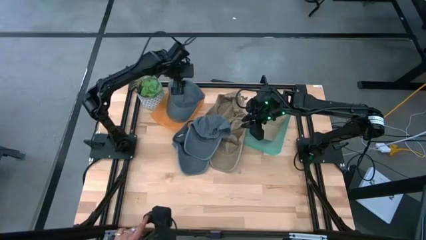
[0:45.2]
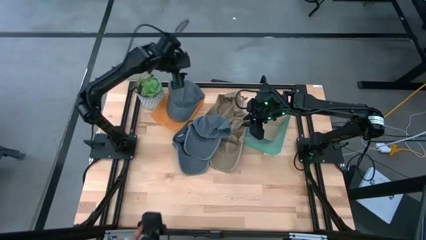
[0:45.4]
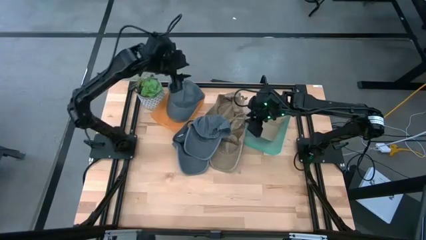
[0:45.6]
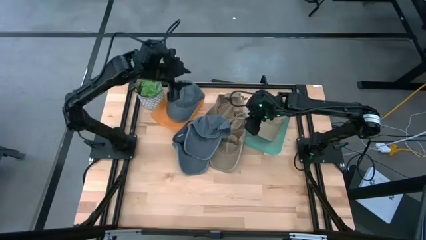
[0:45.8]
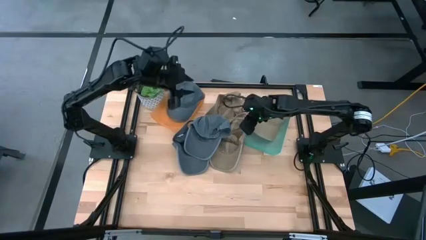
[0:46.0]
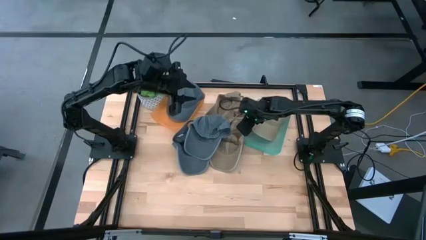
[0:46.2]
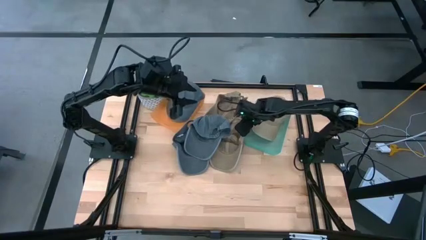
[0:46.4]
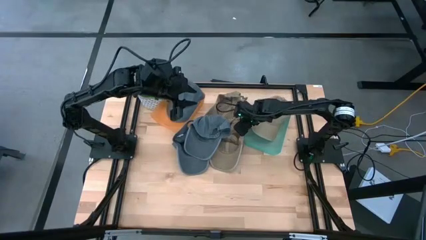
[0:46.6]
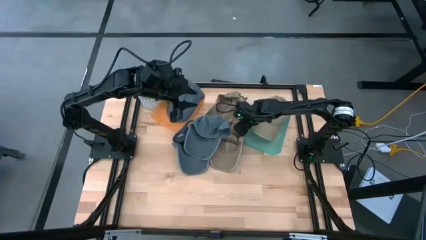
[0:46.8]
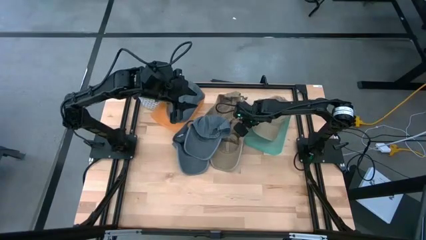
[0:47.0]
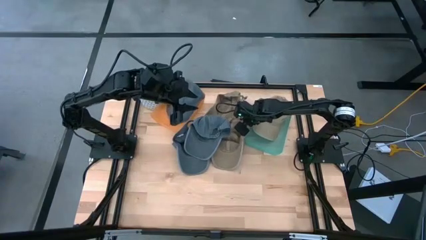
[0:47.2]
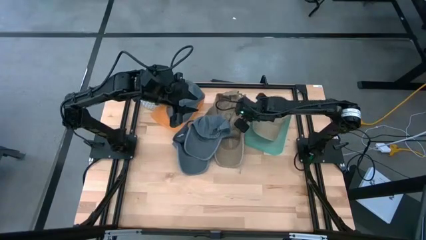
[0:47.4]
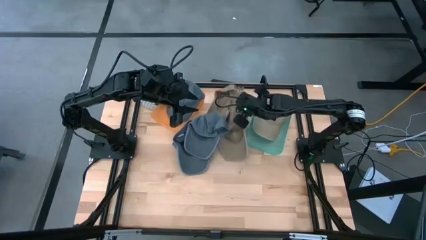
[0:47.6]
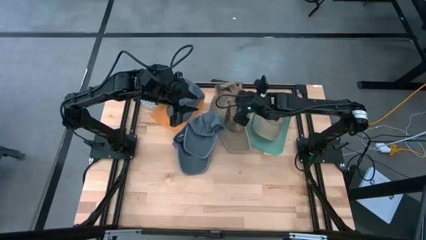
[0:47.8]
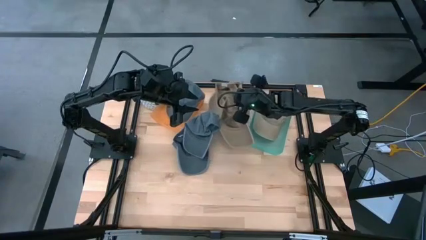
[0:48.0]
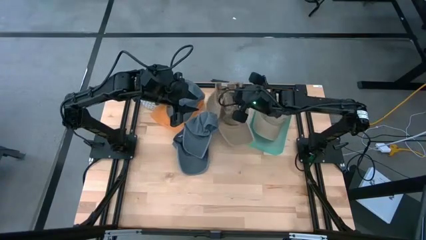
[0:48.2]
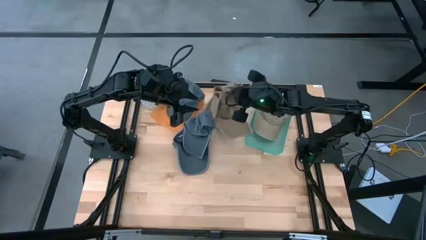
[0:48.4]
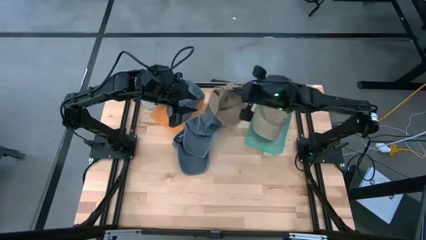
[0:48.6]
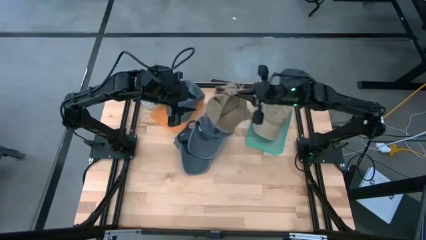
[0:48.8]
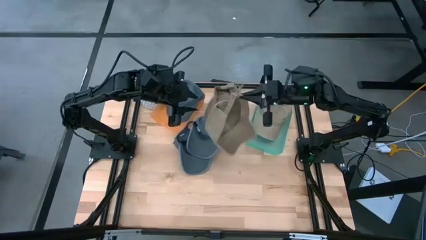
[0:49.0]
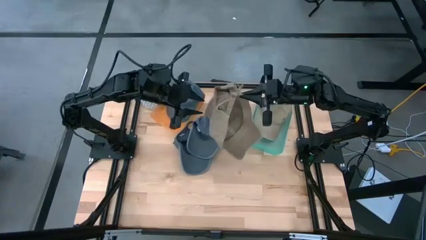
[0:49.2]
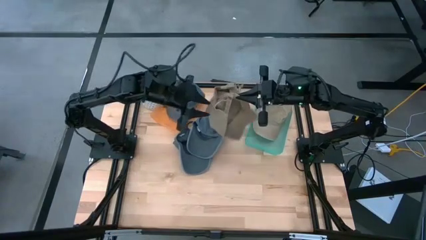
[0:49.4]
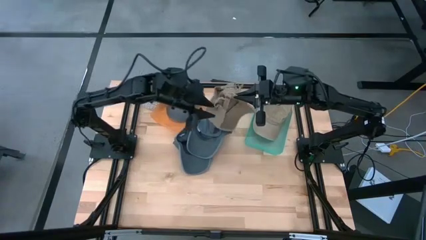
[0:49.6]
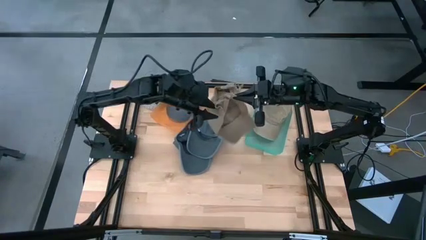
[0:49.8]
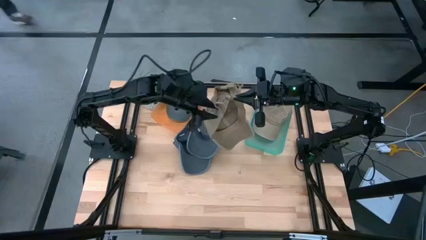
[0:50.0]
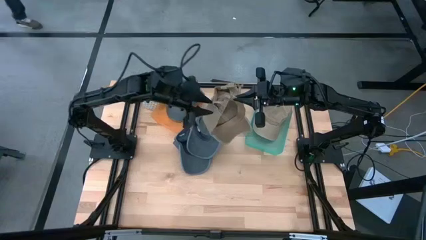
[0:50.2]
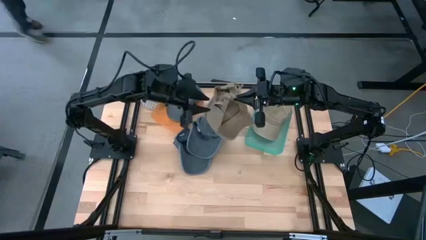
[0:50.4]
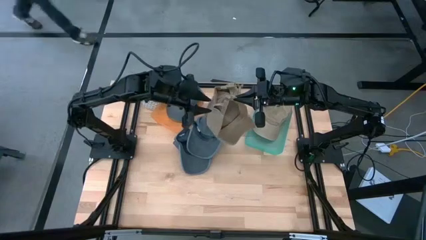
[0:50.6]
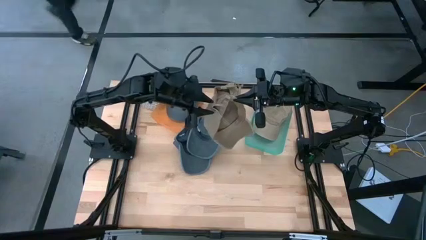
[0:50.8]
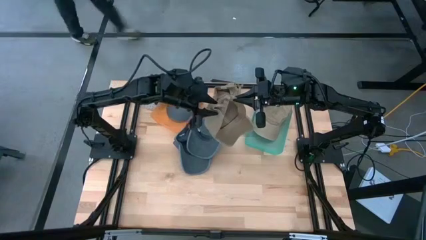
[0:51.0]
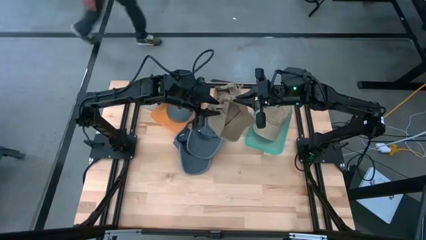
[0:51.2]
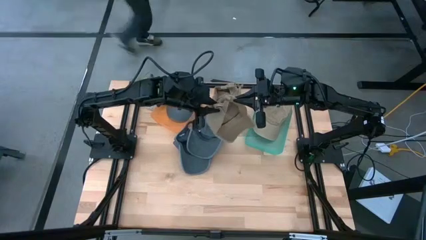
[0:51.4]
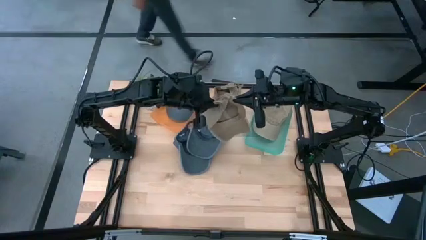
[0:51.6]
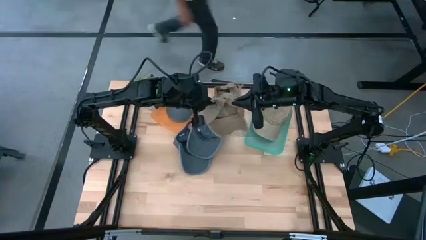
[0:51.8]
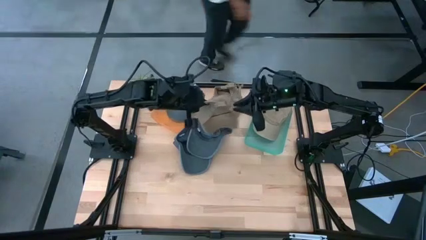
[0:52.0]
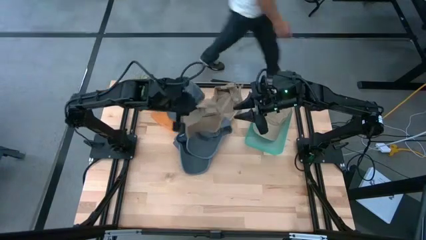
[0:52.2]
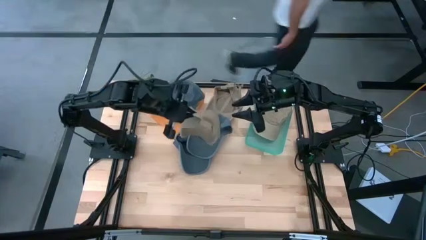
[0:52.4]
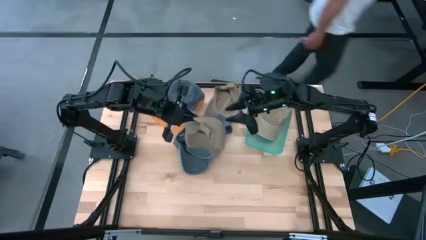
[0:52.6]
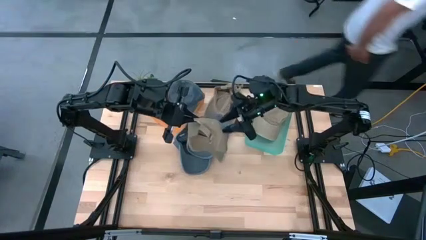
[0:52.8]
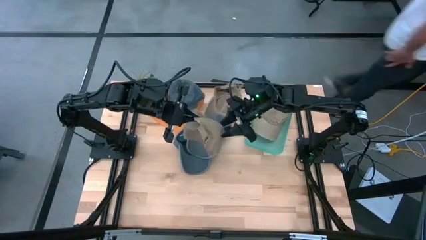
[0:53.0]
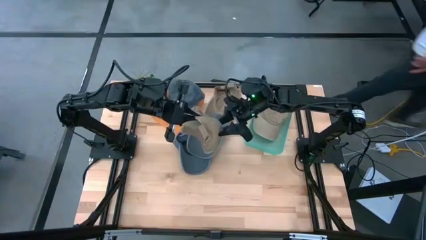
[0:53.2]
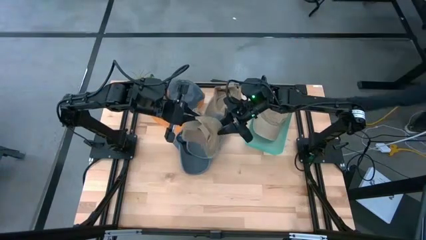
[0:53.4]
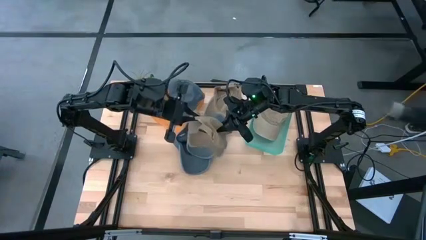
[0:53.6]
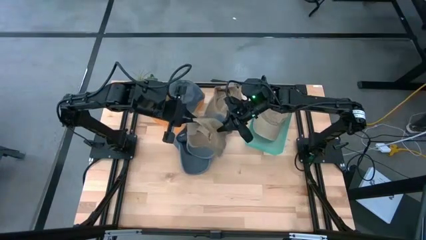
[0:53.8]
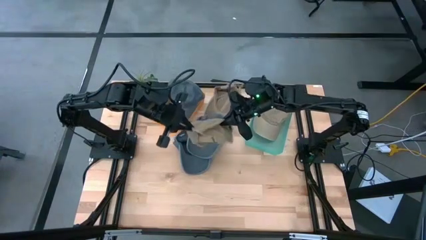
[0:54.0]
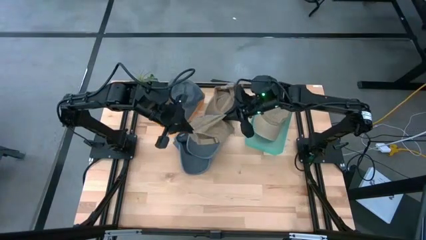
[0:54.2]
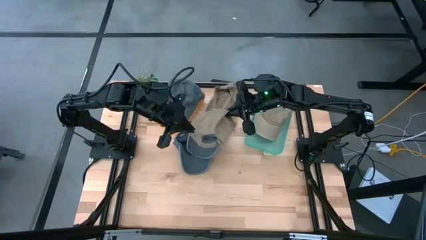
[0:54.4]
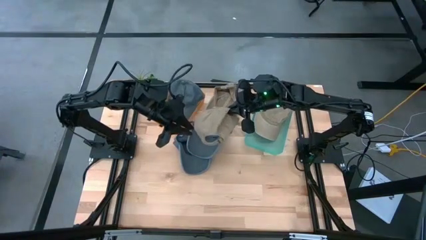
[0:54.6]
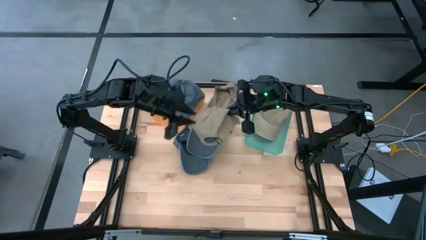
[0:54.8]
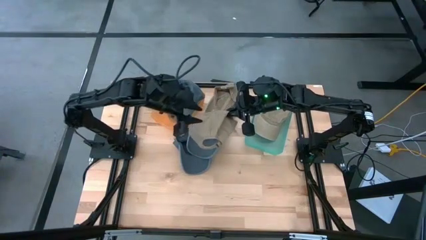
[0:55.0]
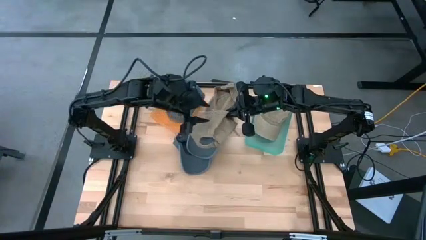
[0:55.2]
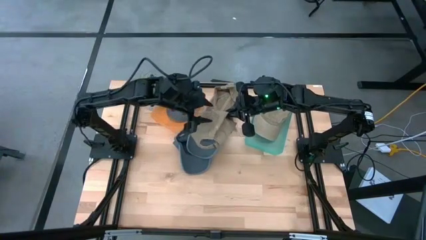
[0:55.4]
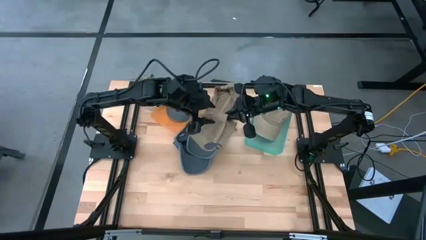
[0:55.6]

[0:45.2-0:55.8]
Task: Pick & Place hat
Put the brown cap into the blue bin

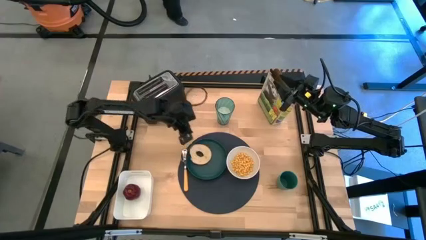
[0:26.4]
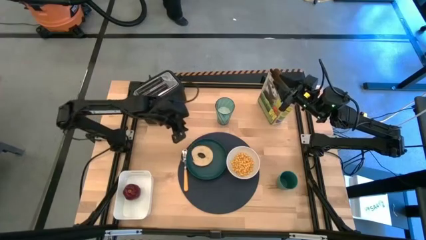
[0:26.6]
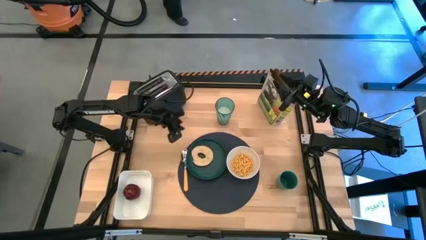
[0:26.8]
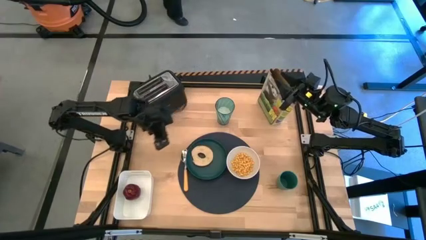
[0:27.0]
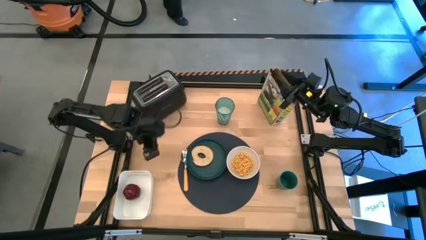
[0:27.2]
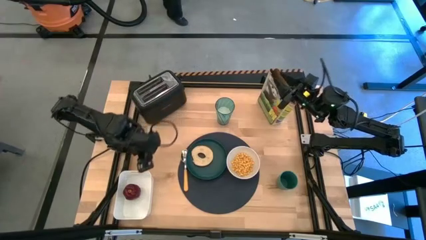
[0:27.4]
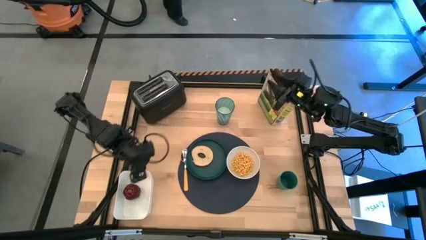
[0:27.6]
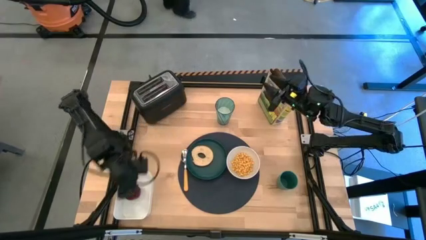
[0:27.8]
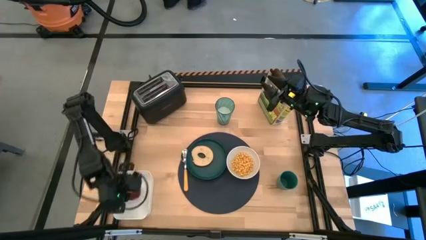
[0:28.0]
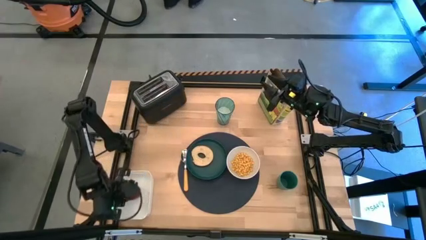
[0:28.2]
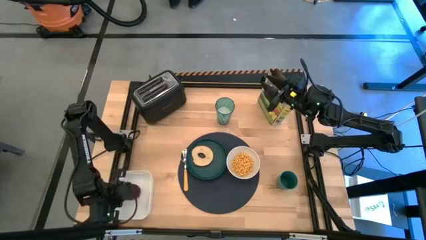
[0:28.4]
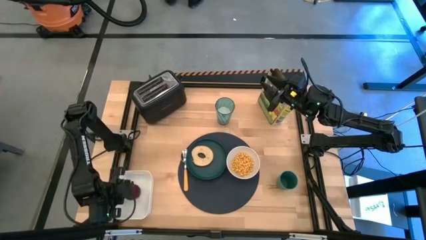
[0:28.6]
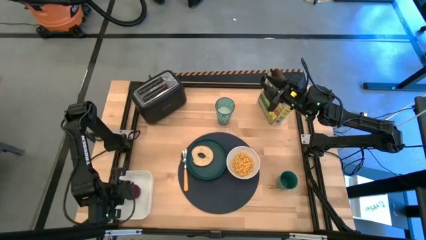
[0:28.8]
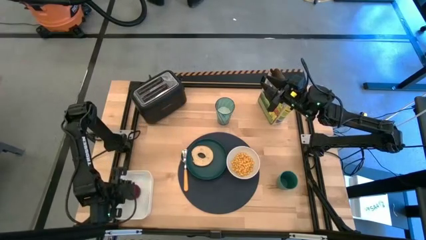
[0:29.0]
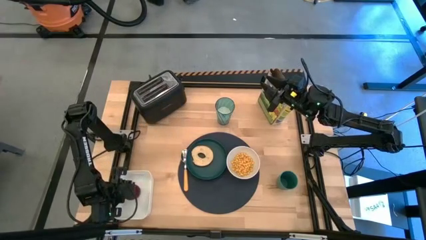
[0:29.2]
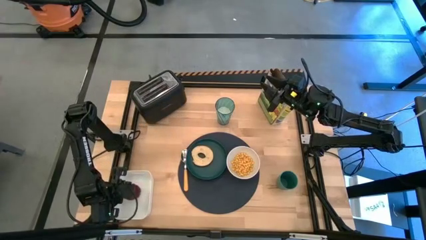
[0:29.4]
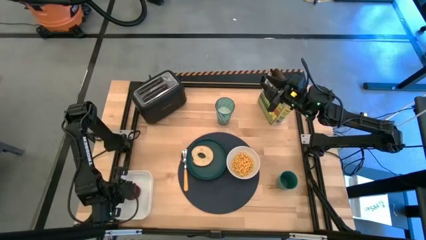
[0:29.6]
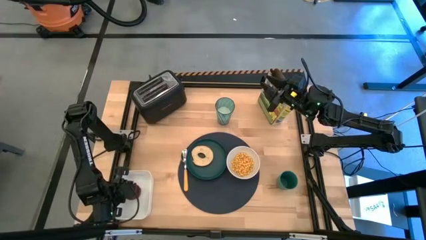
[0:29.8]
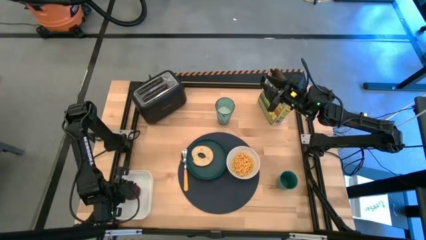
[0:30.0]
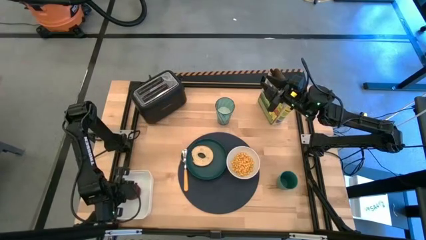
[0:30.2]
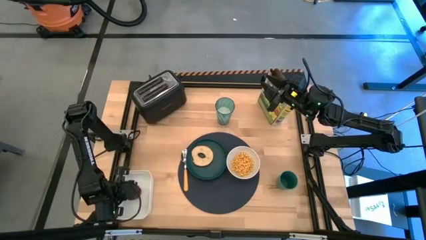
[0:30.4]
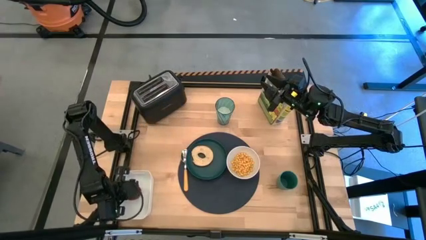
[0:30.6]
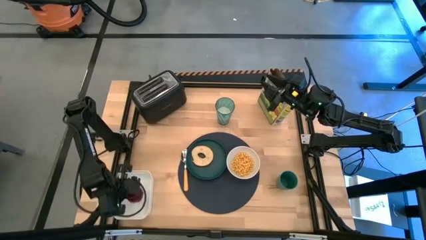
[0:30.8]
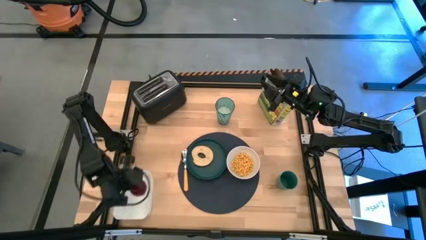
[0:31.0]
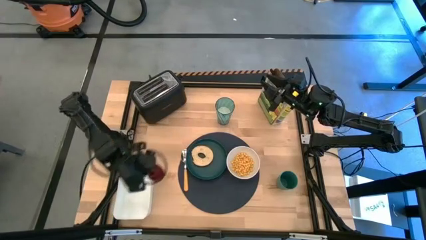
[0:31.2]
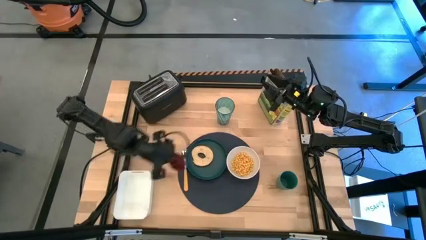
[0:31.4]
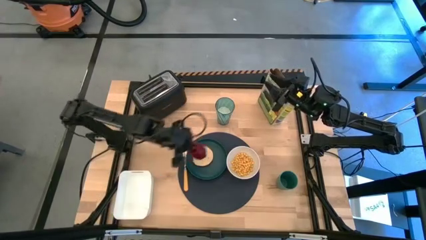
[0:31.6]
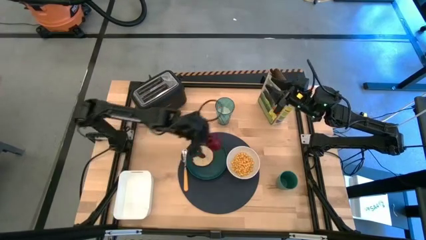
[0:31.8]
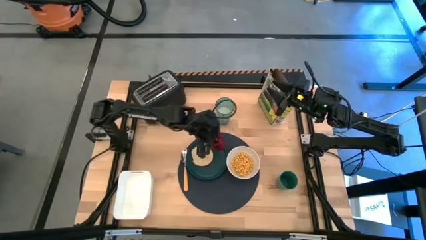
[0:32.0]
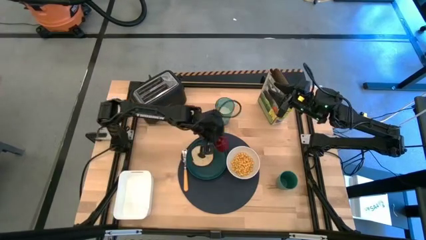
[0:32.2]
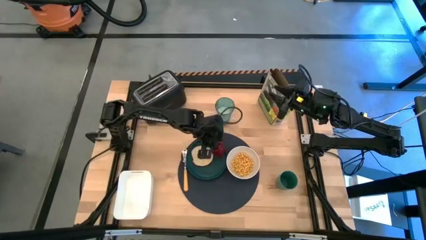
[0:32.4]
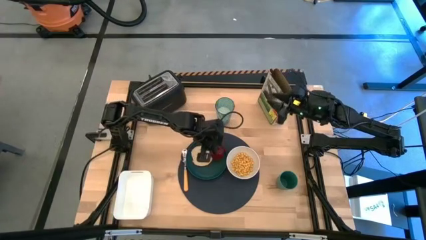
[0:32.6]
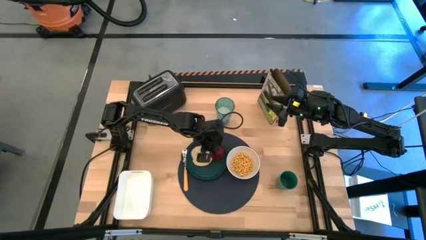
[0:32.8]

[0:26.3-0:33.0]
Task: Arrange a breakfast setting
Put the apple on the dark green plate
